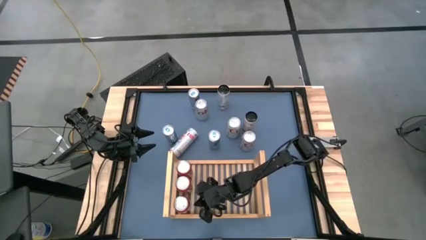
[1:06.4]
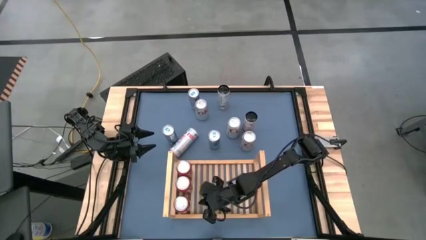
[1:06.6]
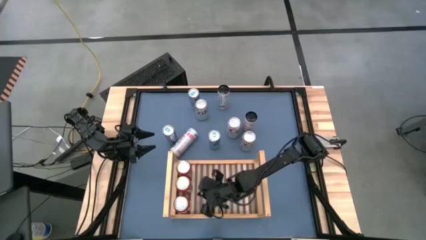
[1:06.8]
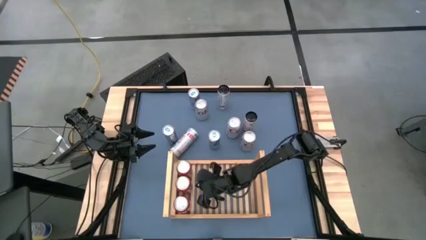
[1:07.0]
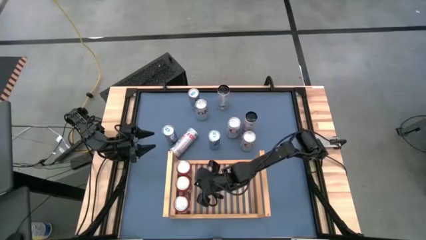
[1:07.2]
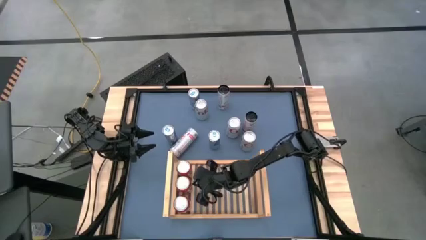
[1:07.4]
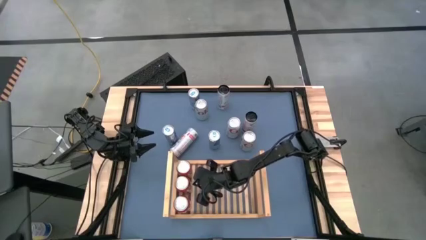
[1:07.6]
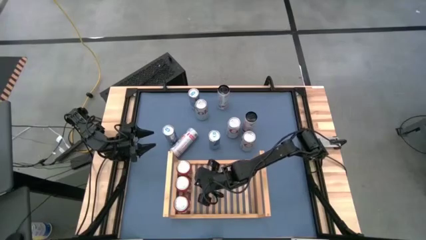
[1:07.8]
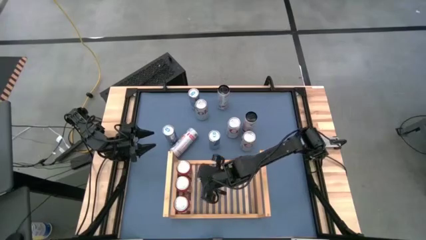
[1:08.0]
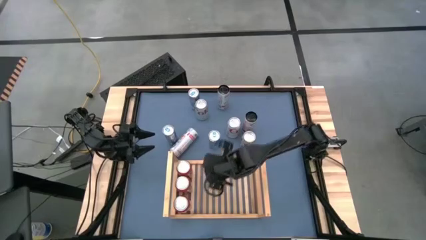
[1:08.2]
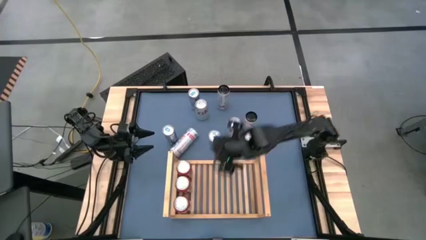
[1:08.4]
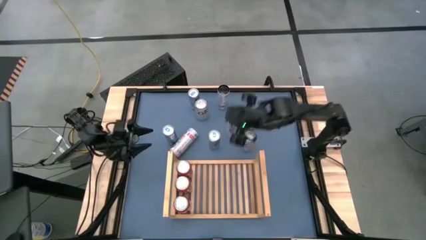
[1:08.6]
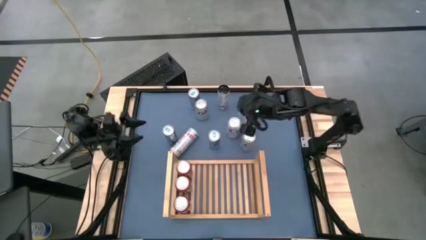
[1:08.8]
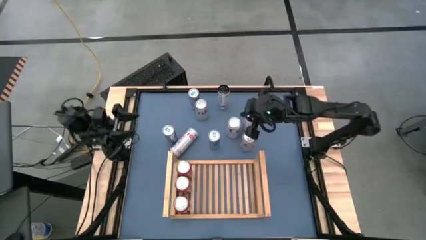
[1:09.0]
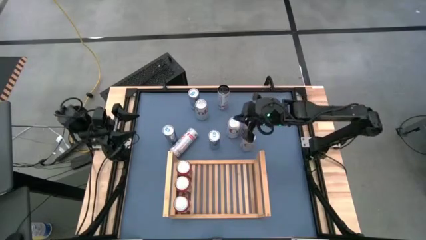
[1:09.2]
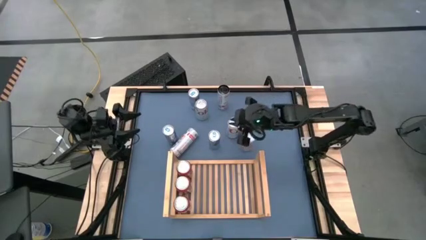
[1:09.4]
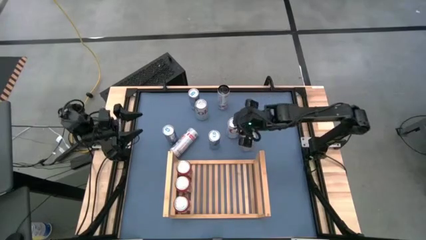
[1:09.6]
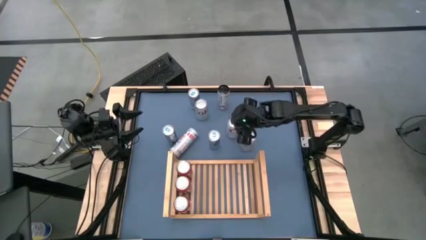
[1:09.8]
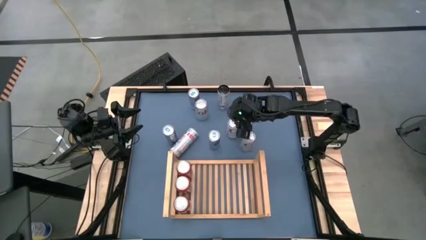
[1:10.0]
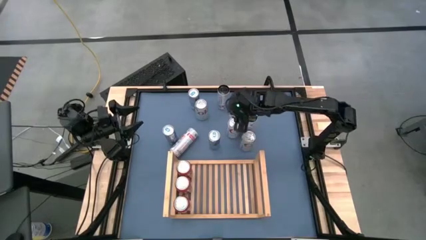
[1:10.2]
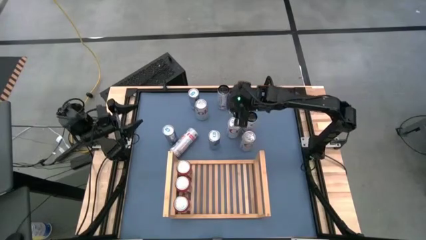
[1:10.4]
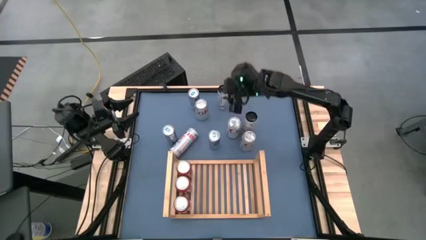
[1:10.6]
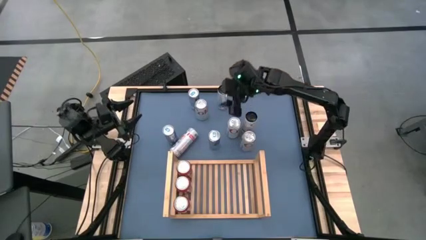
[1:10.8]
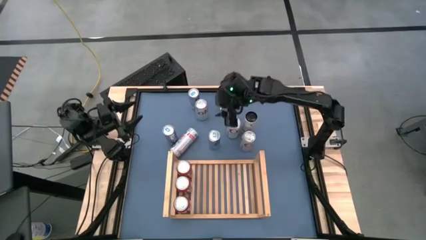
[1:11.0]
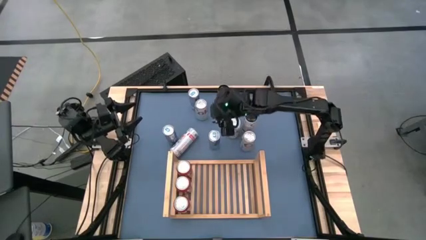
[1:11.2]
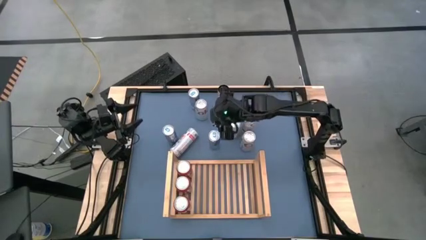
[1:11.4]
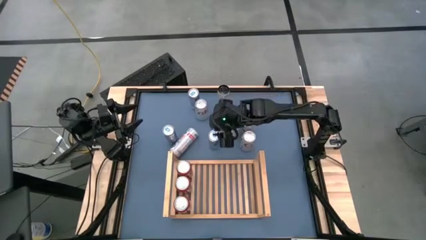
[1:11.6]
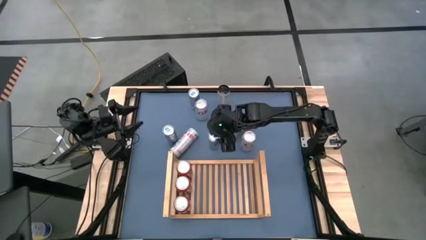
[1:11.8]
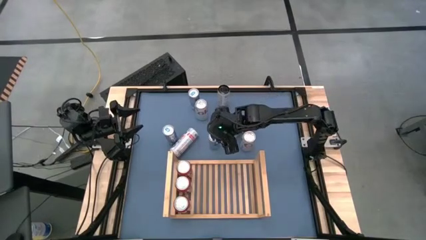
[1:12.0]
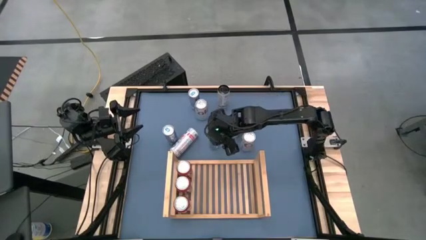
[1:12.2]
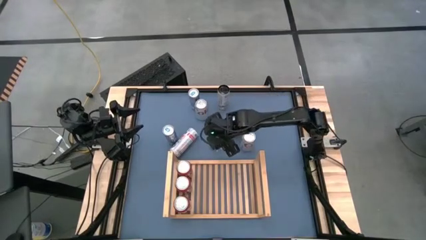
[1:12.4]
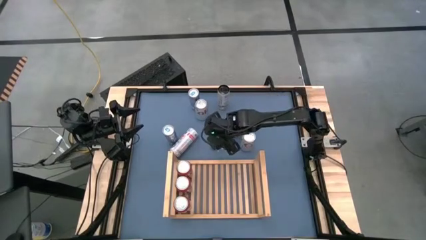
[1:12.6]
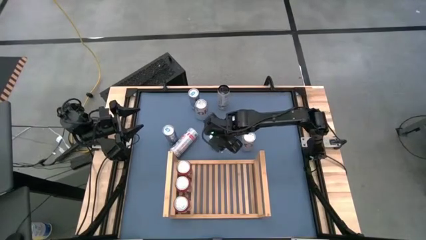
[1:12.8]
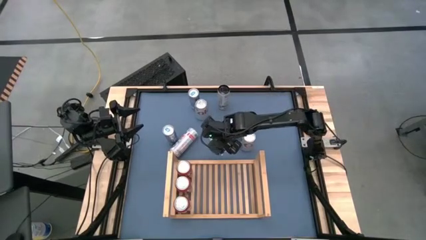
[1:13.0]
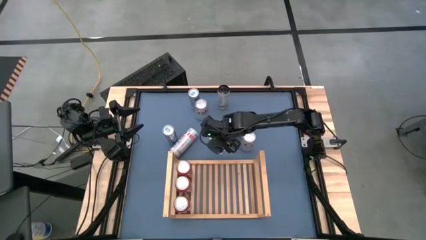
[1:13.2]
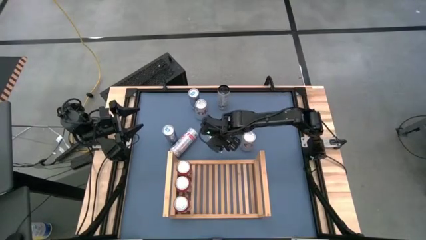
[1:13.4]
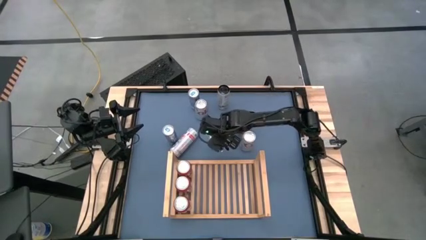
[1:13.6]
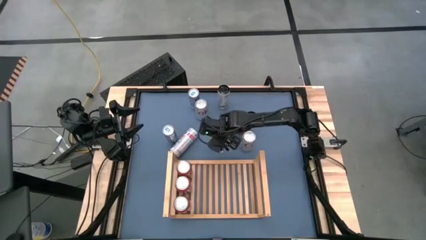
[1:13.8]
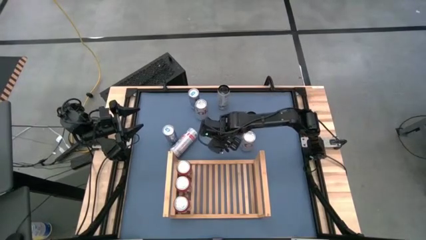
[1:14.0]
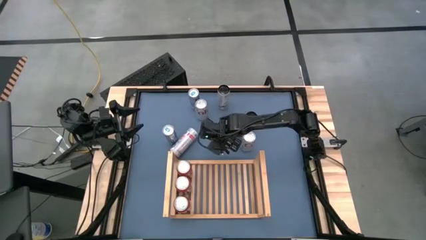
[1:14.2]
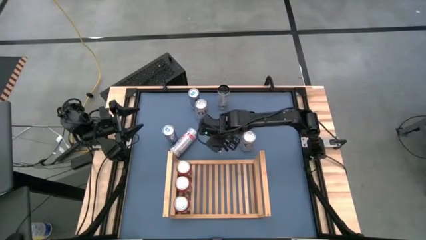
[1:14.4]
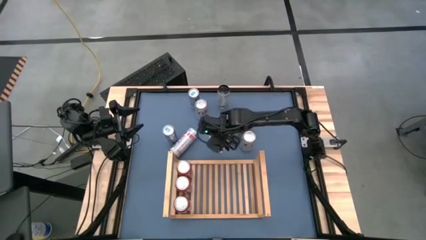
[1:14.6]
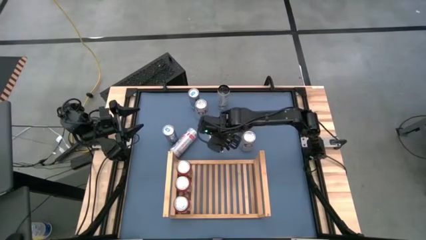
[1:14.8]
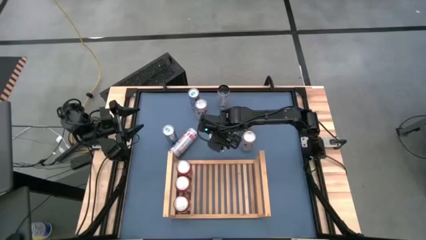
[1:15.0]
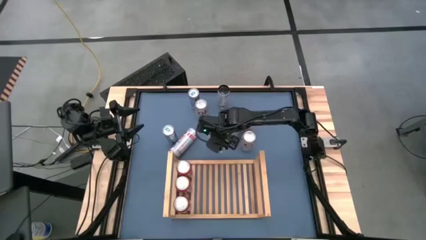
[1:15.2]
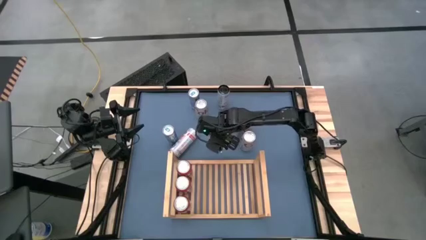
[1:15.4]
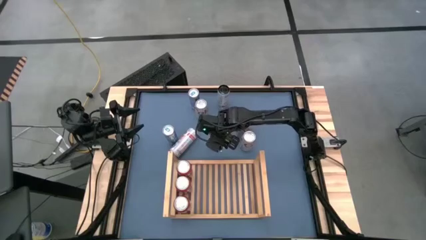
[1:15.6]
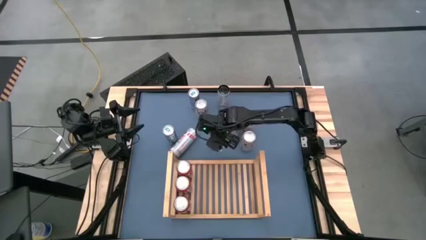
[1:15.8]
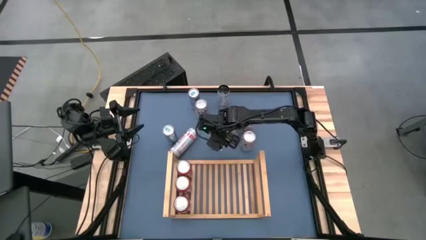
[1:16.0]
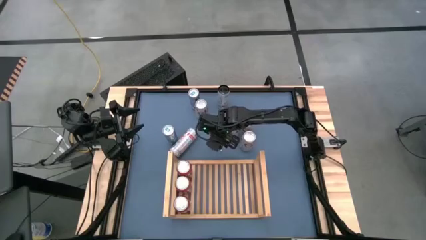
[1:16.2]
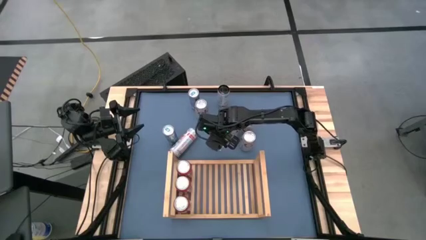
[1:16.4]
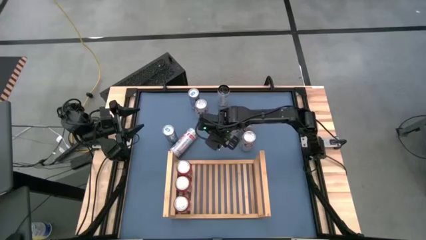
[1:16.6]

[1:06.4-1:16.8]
Task: Place canned beverage on shelf
Put the bottom blue soda can on the shelf
